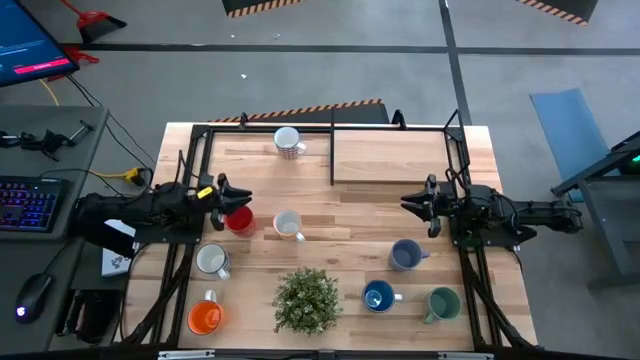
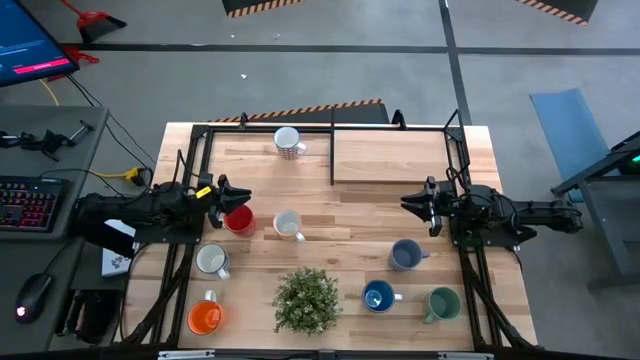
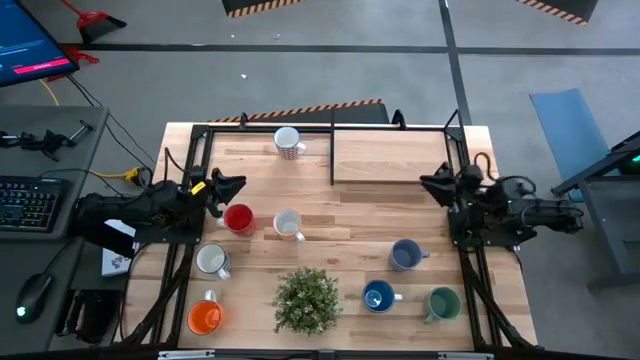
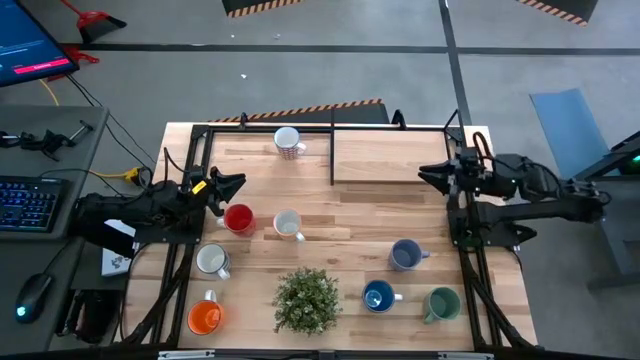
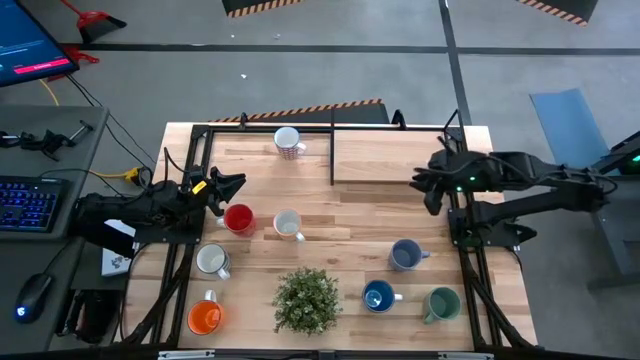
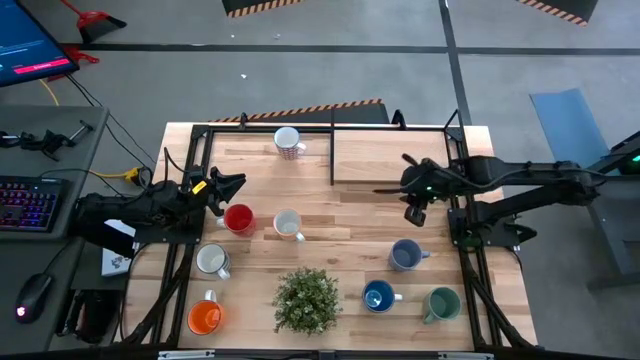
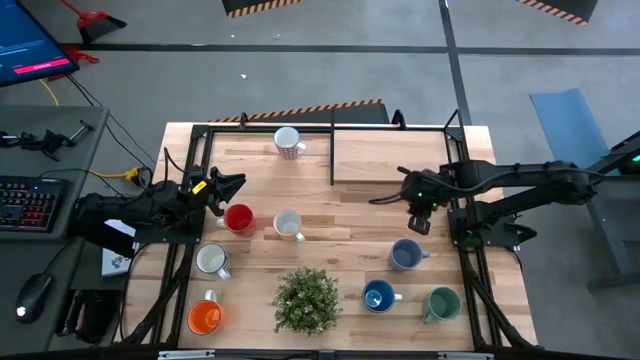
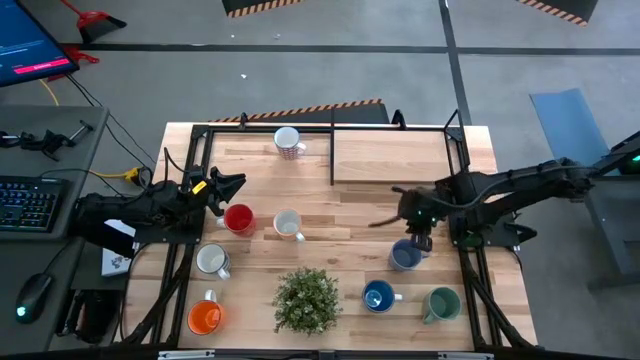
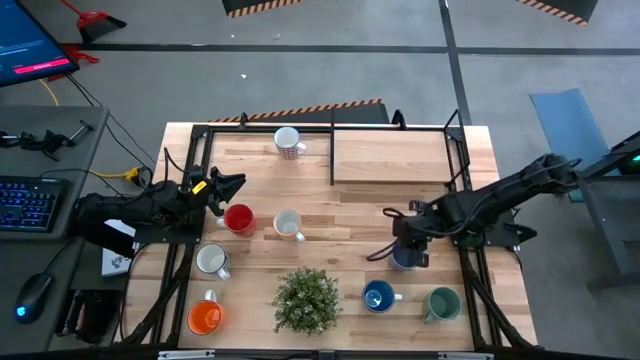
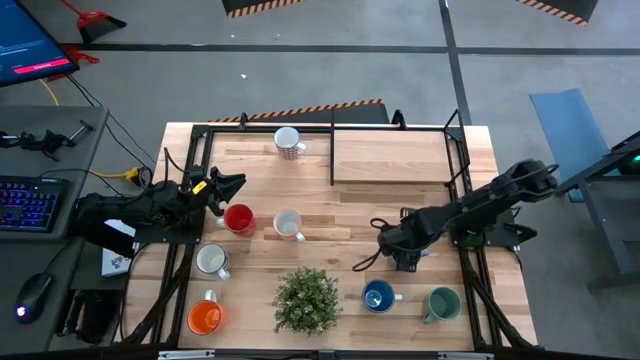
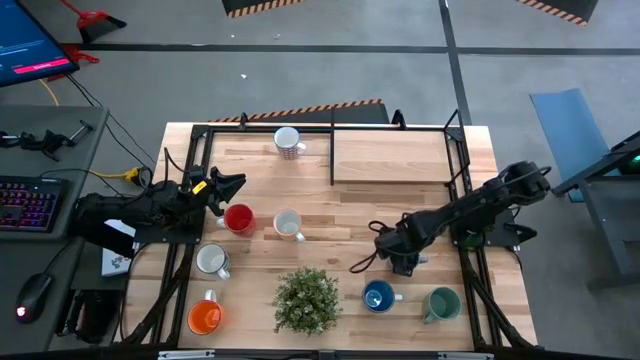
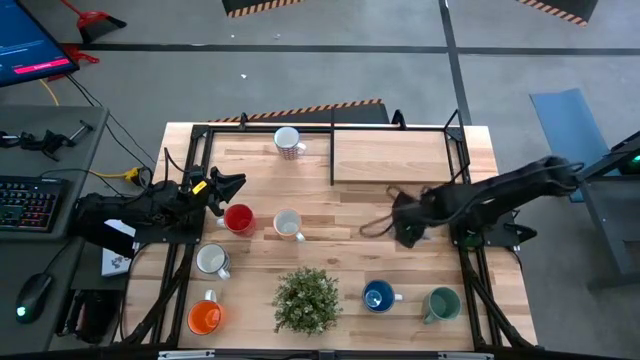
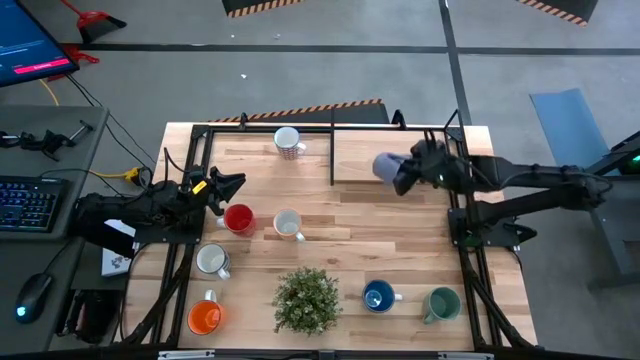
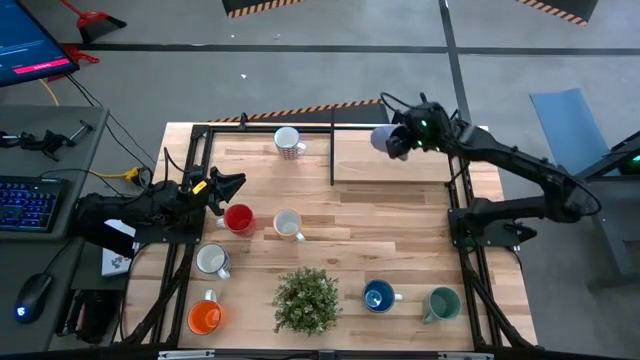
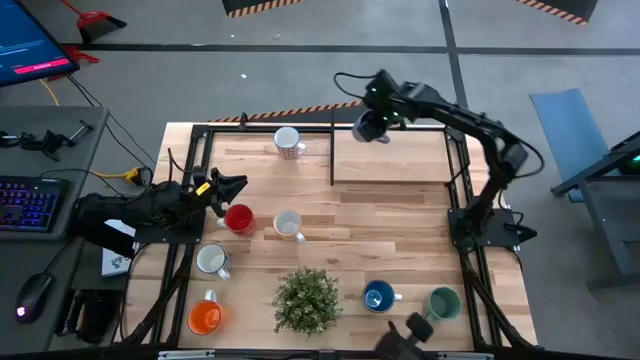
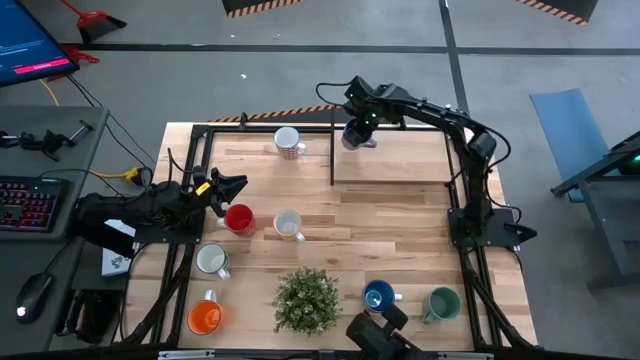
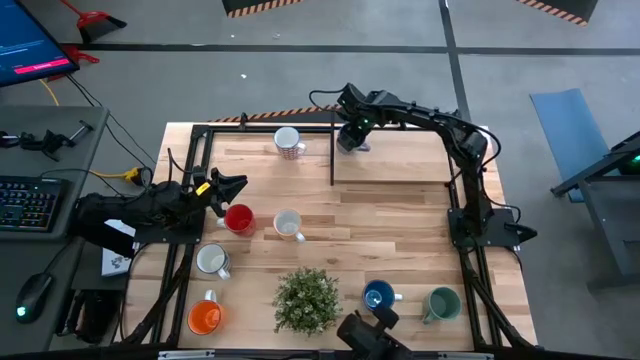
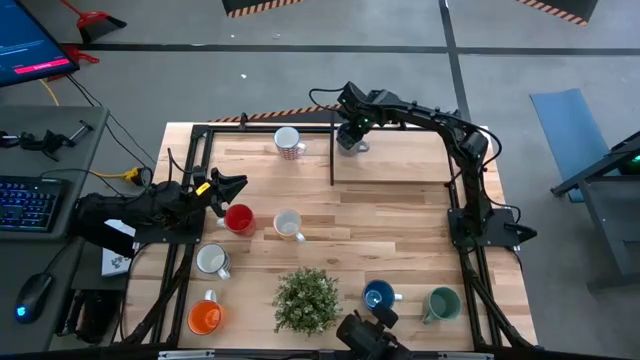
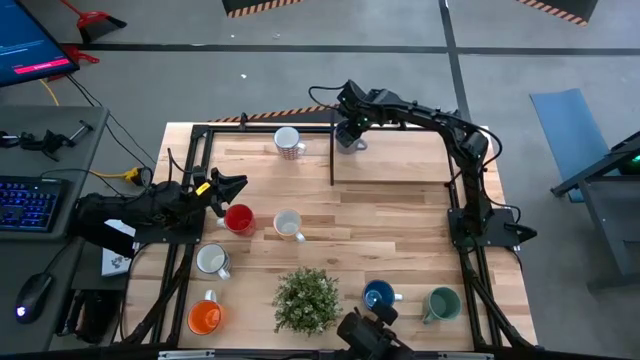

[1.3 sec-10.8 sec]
Task: Place coffee mugs
Put the light blue mug on the shelf

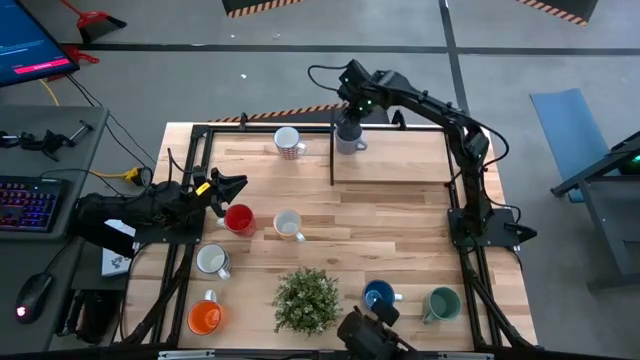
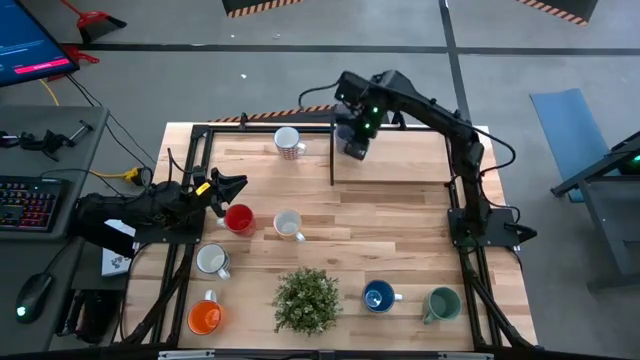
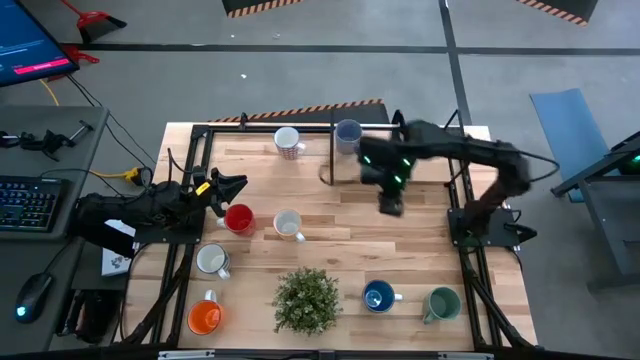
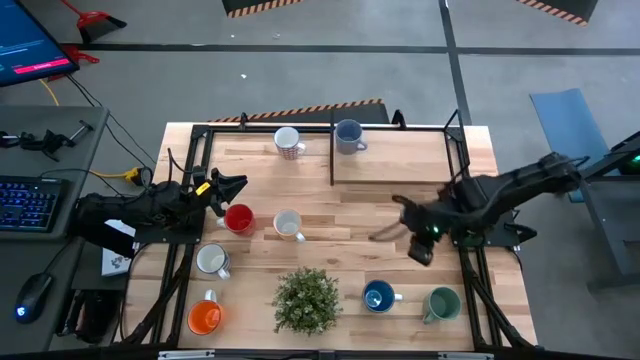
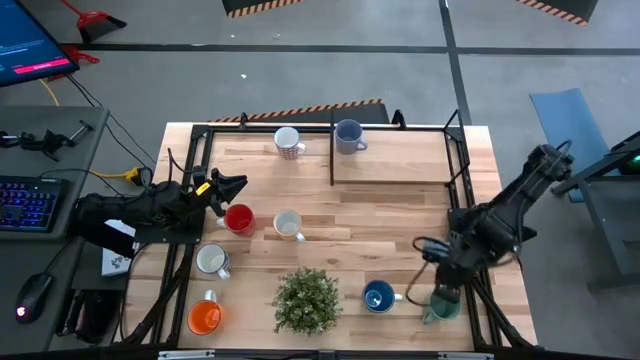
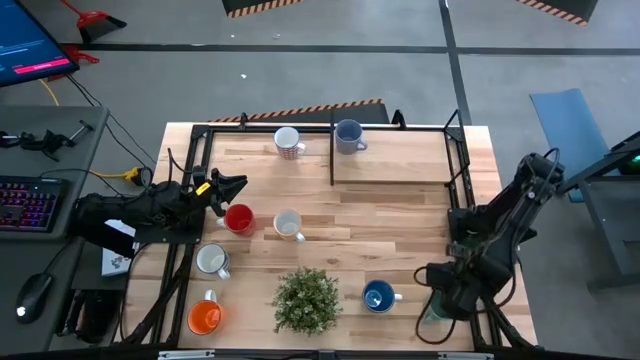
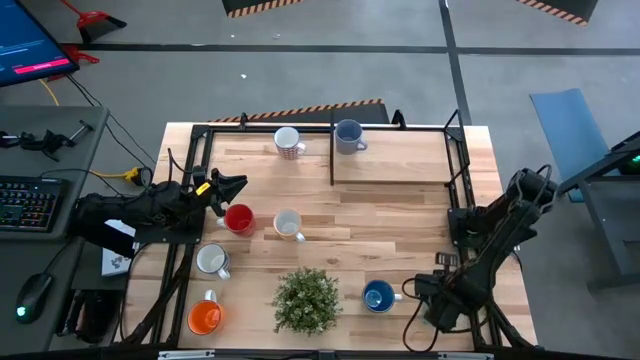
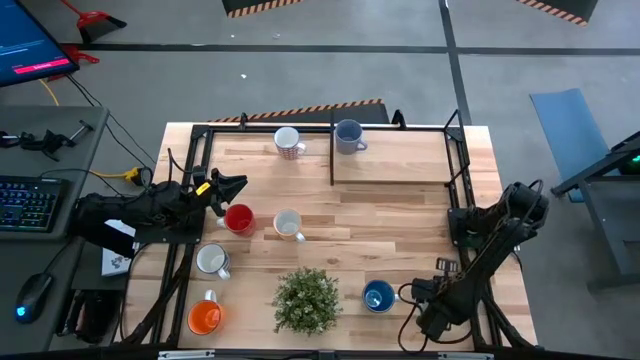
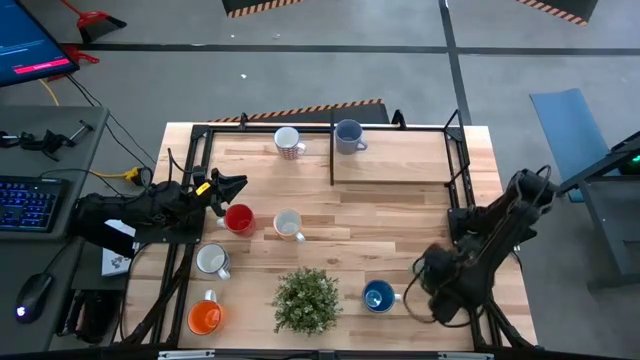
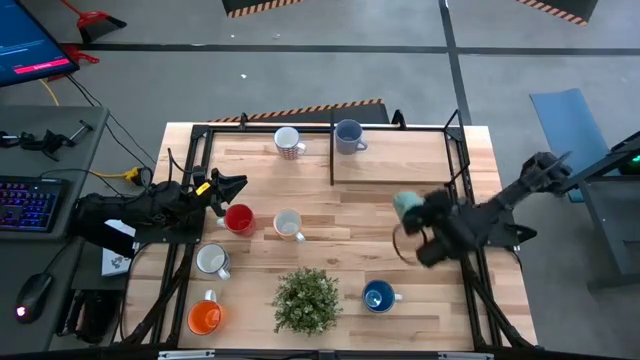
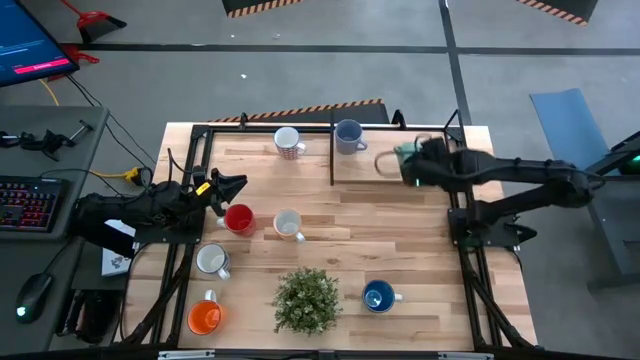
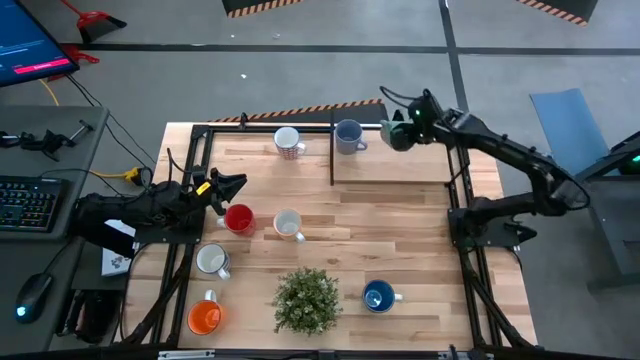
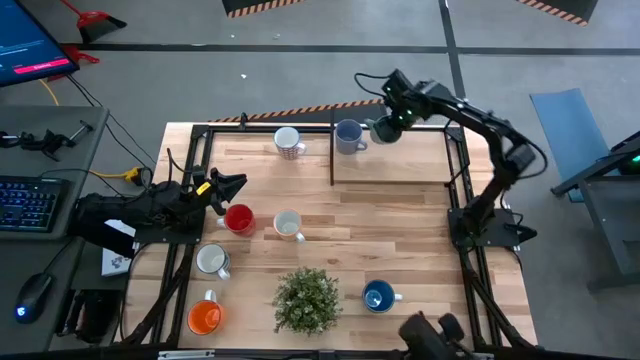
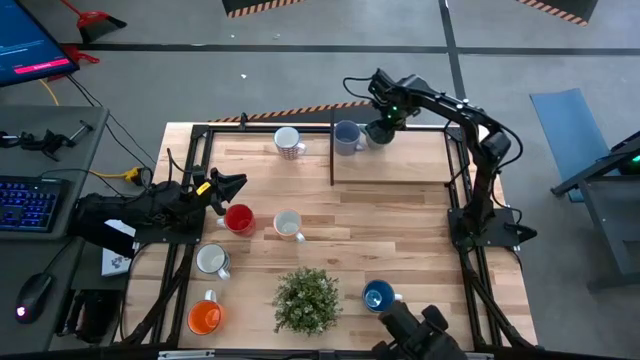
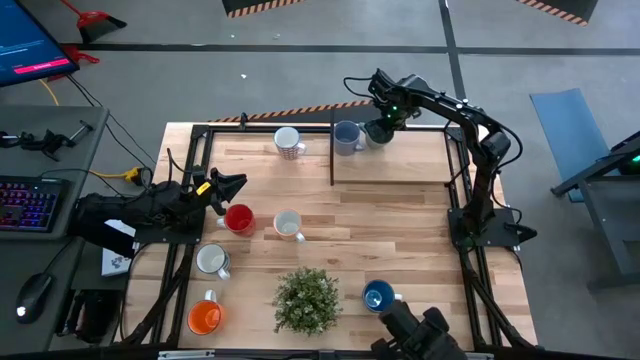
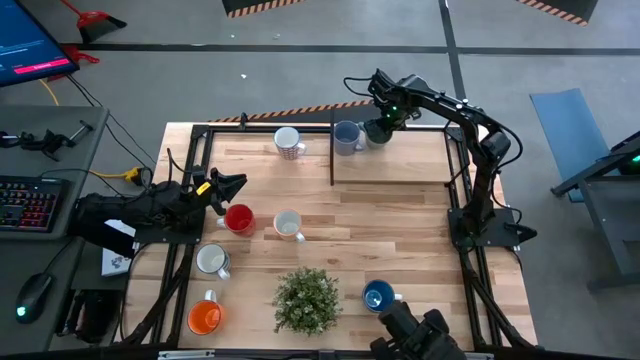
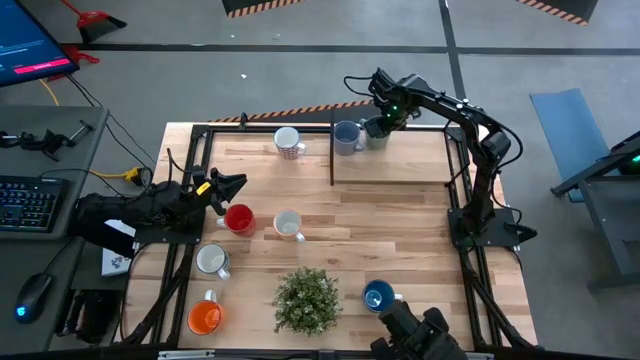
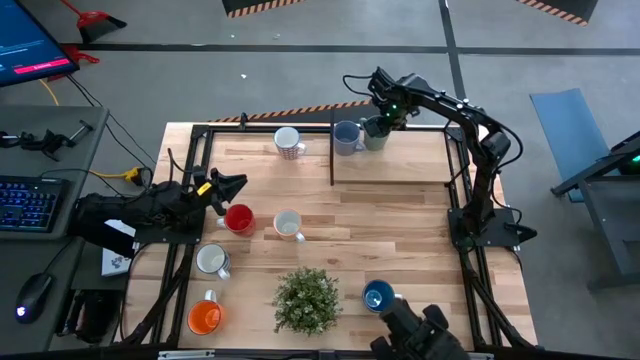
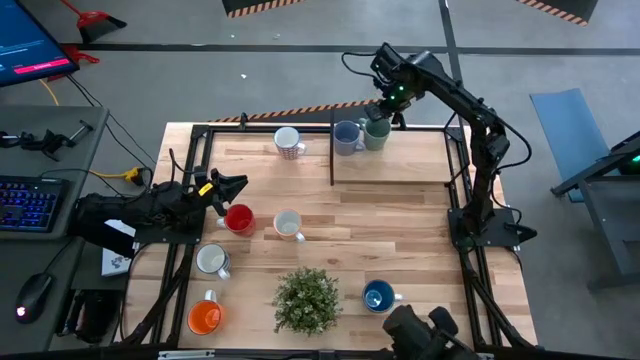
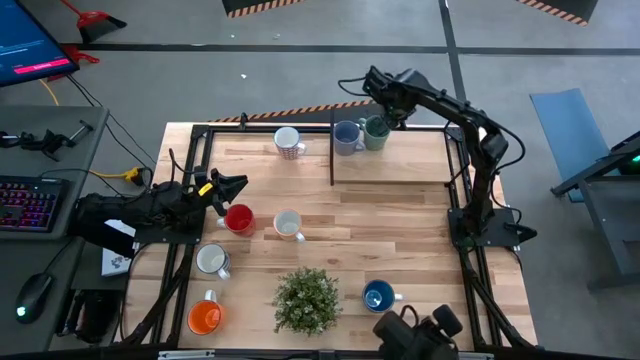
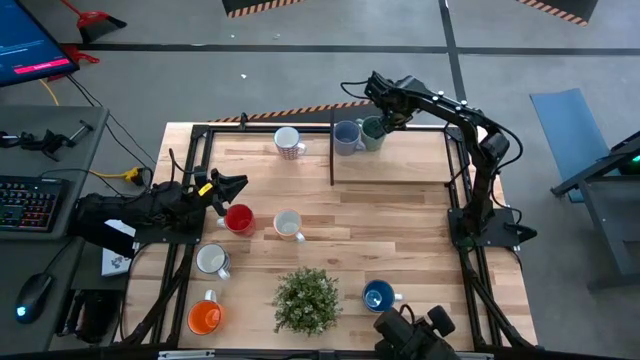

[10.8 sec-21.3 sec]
Put the green mug on the shelf
